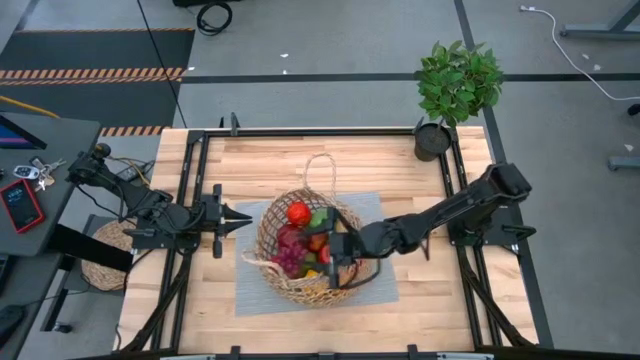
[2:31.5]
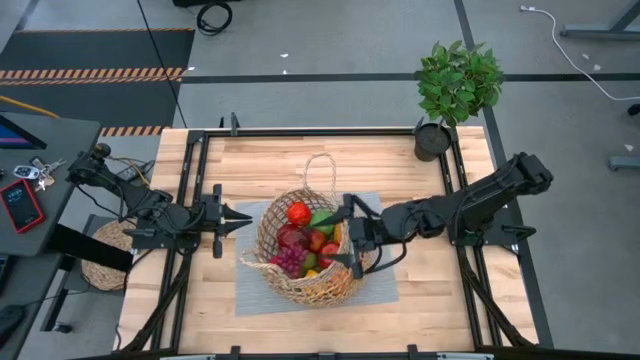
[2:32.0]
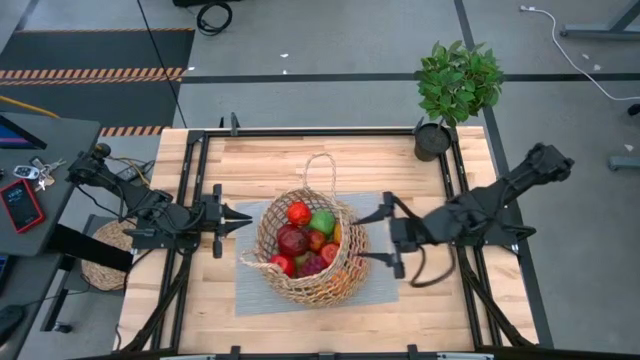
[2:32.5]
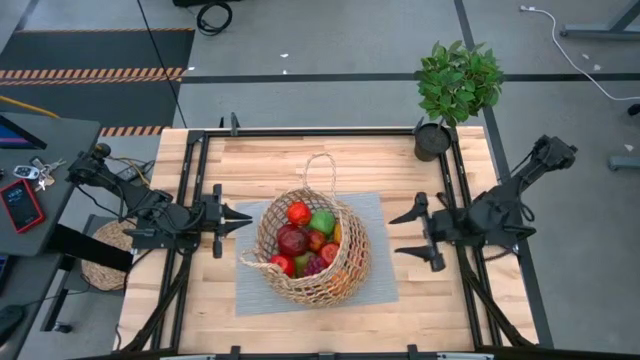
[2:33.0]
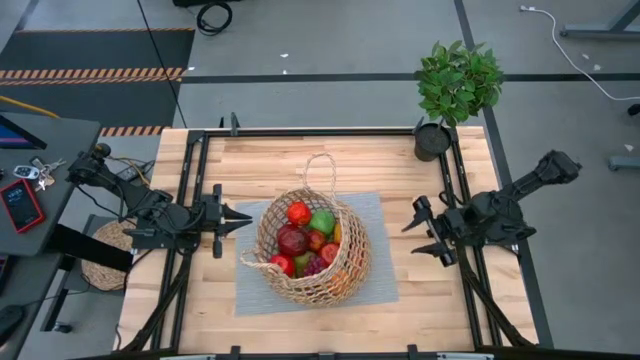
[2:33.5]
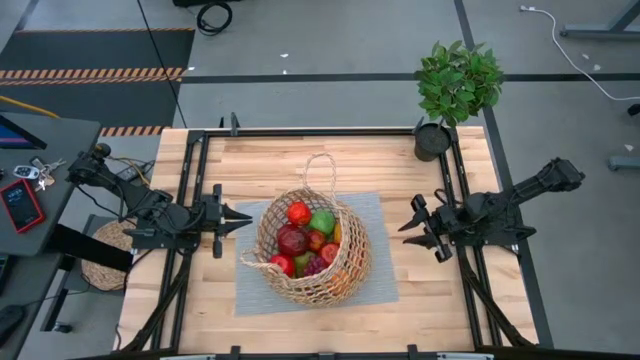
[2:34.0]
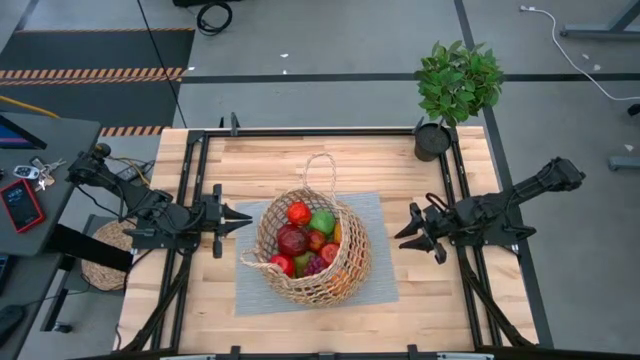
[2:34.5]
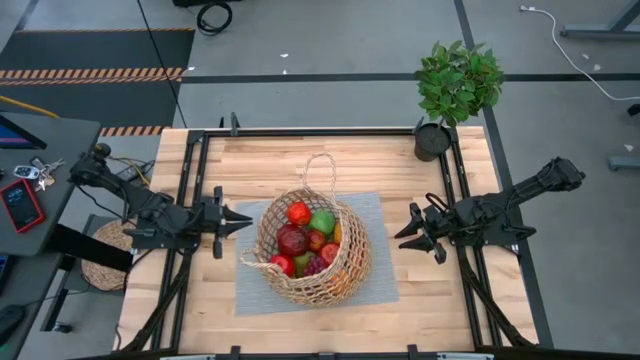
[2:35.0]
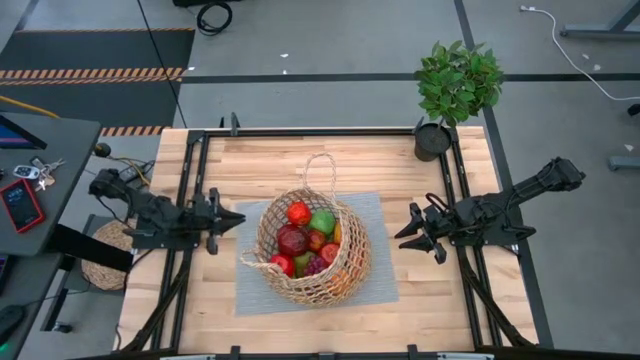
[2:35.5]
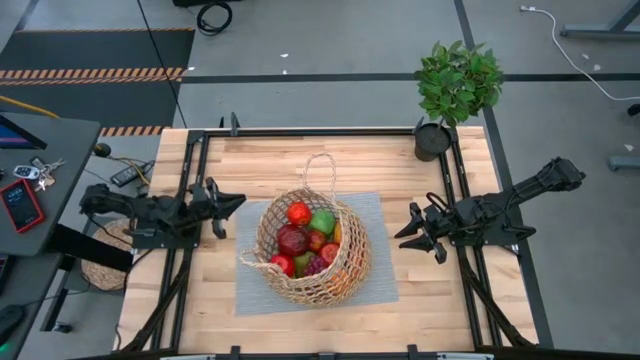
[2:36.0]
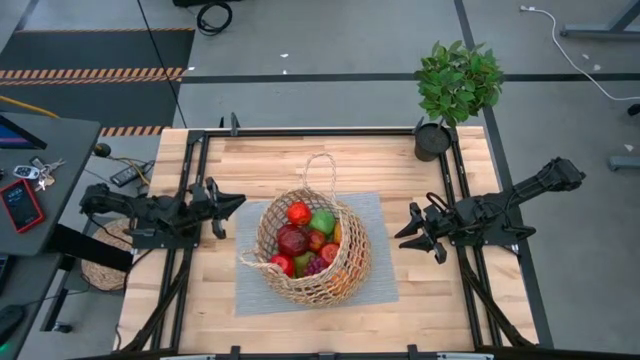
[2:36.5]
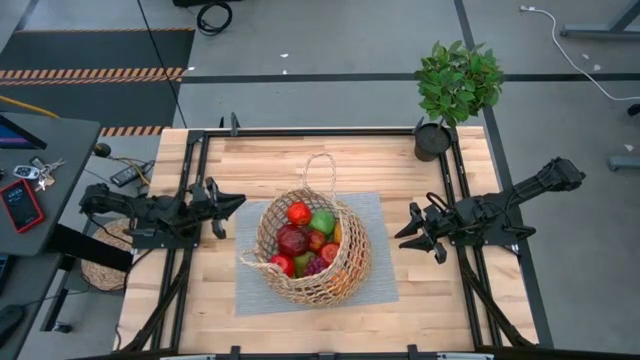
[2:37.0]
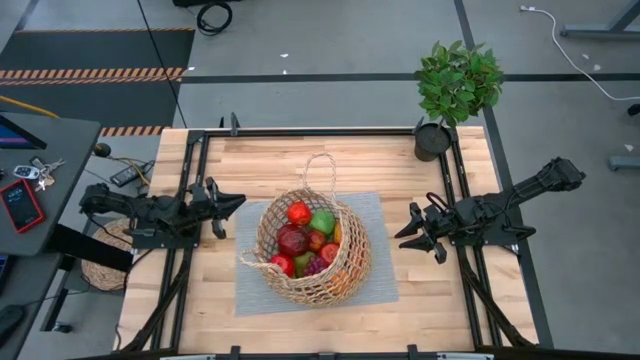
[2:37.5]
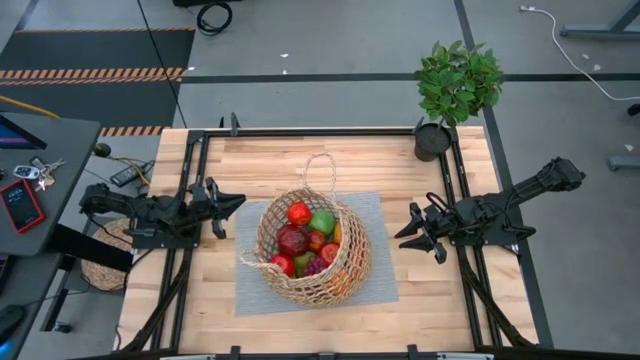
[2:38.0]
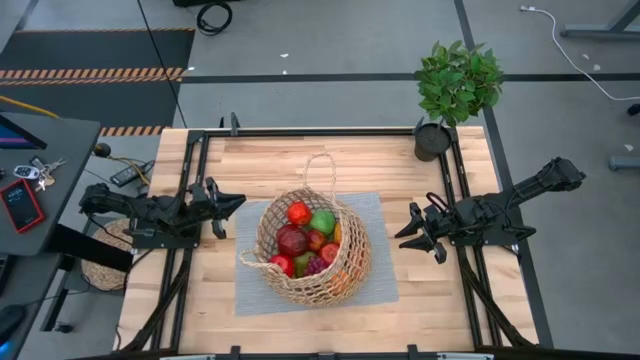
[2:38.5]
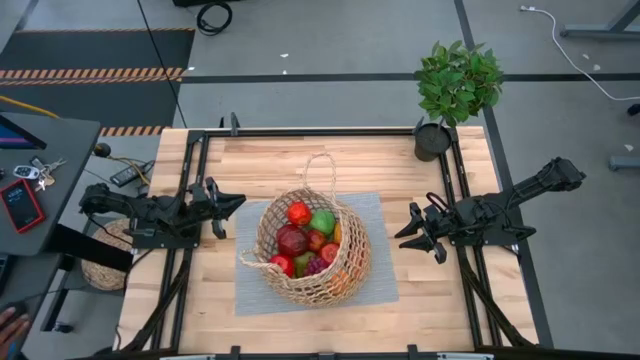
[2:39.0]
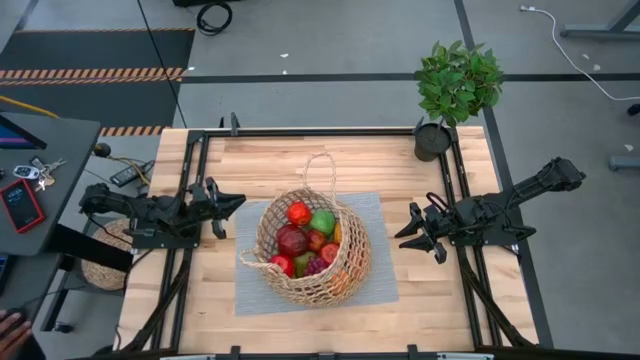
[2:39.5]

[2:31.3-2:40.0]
Task: Build produce basket
Return to home position

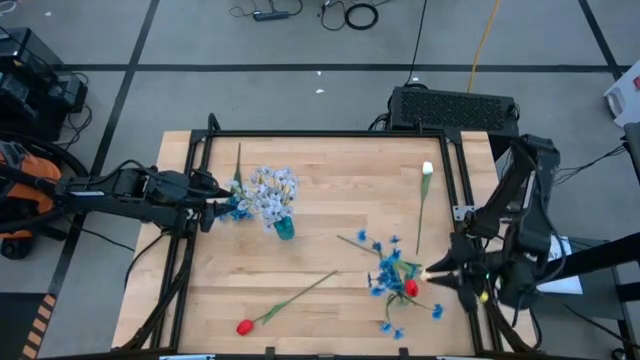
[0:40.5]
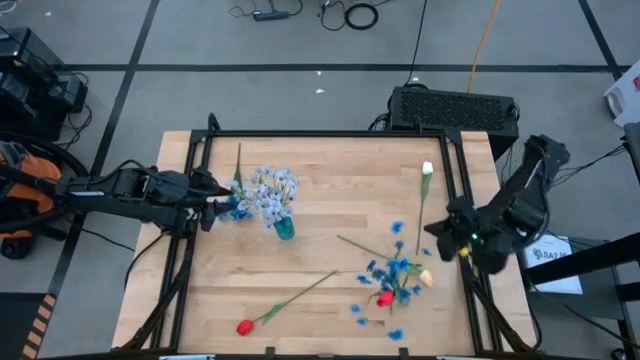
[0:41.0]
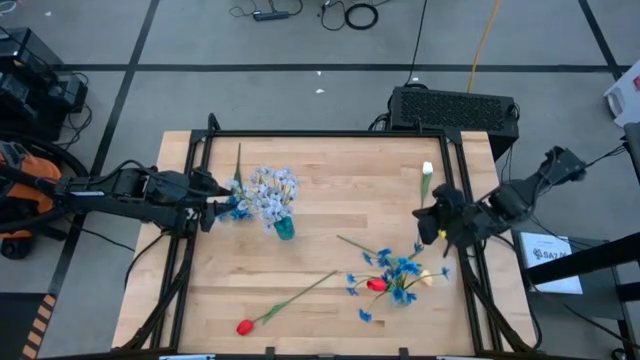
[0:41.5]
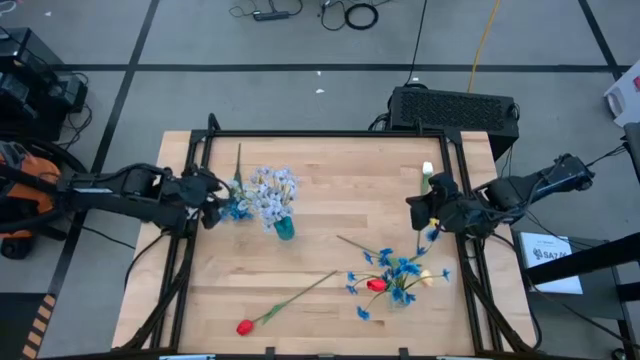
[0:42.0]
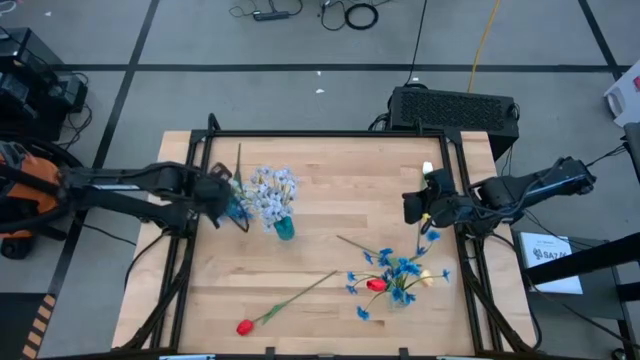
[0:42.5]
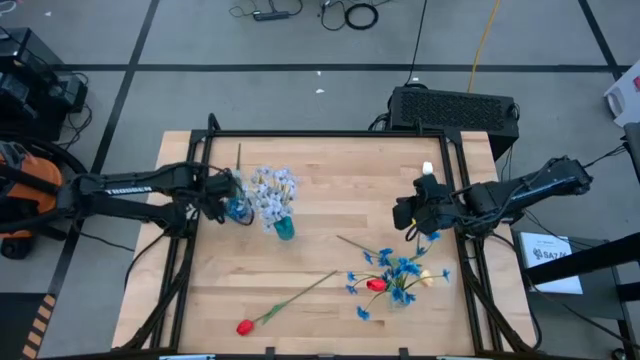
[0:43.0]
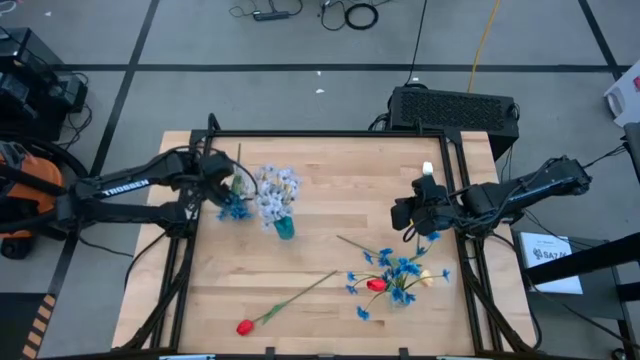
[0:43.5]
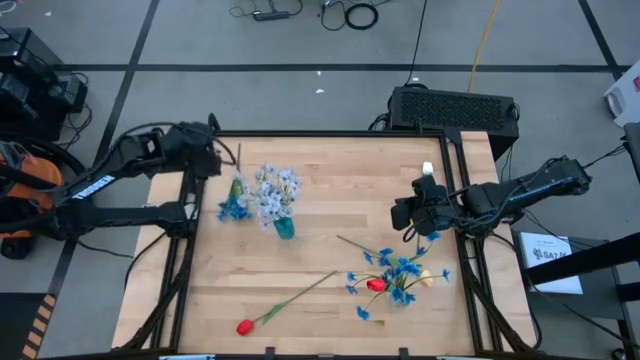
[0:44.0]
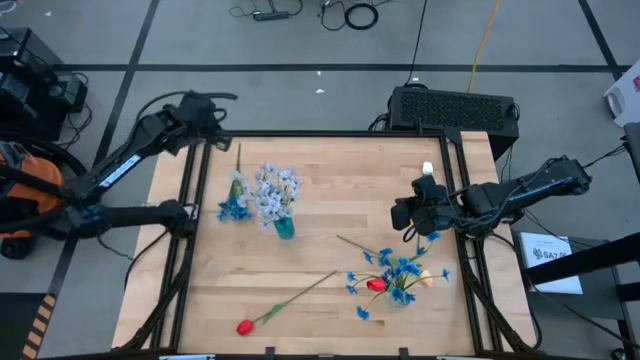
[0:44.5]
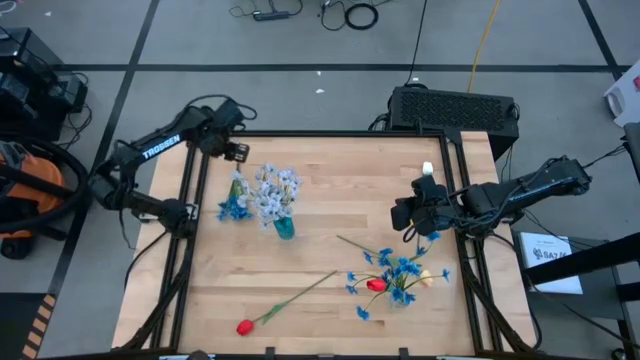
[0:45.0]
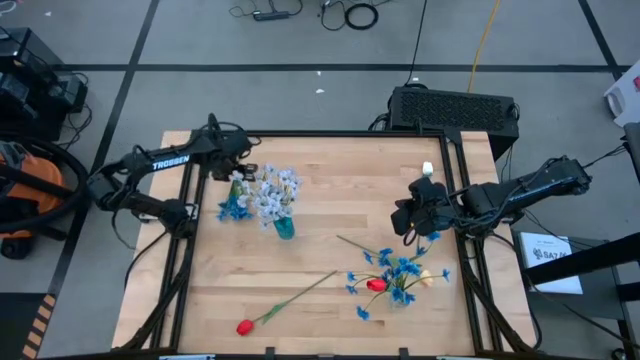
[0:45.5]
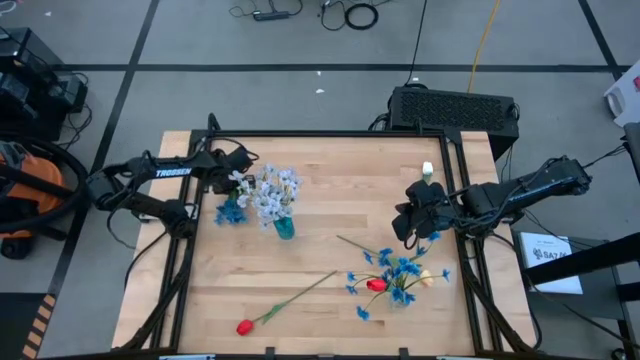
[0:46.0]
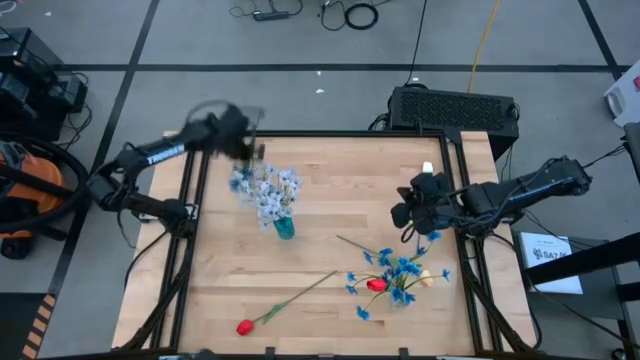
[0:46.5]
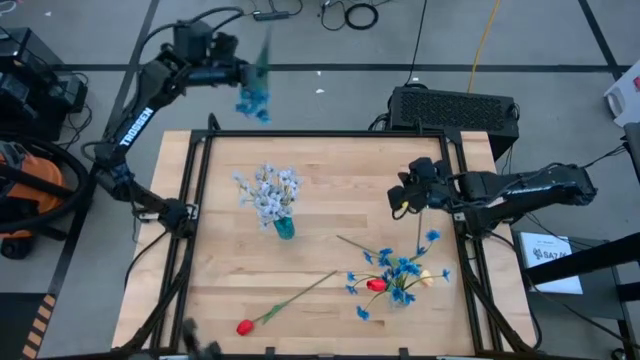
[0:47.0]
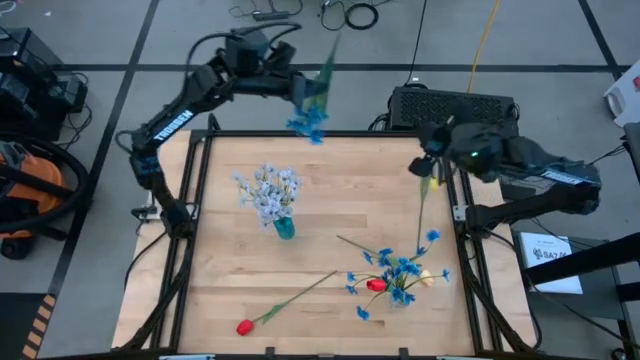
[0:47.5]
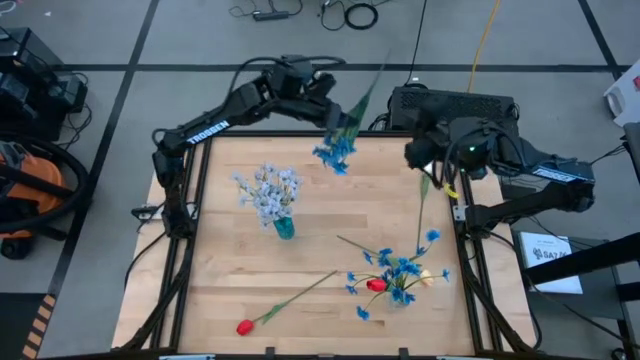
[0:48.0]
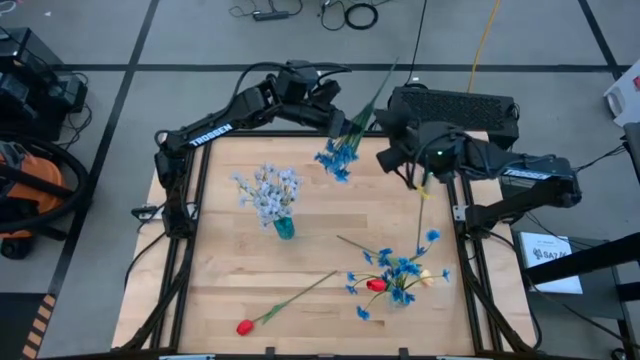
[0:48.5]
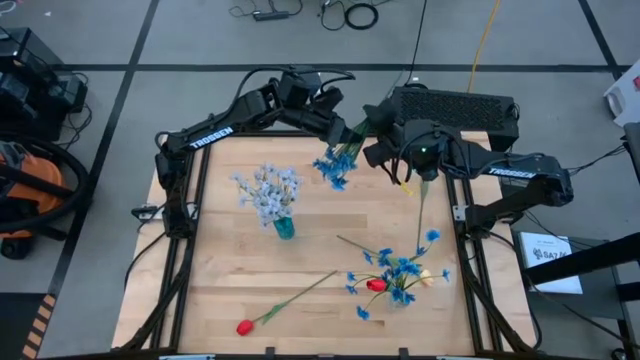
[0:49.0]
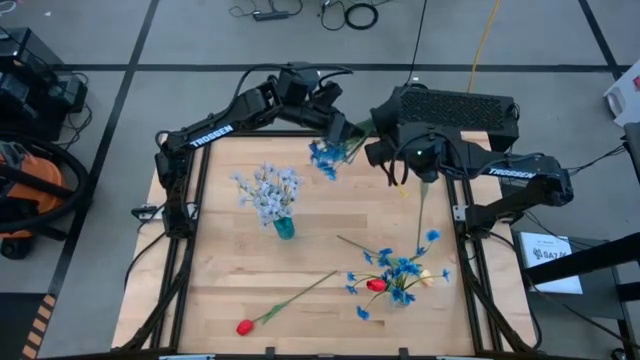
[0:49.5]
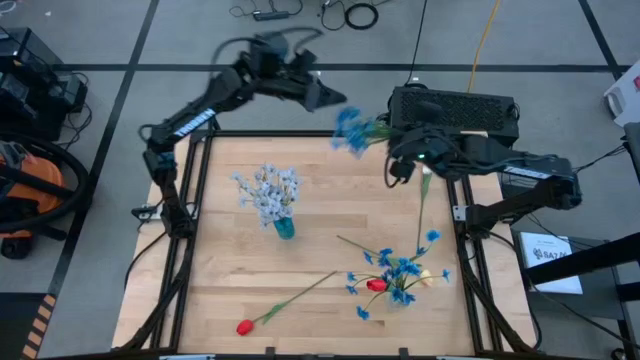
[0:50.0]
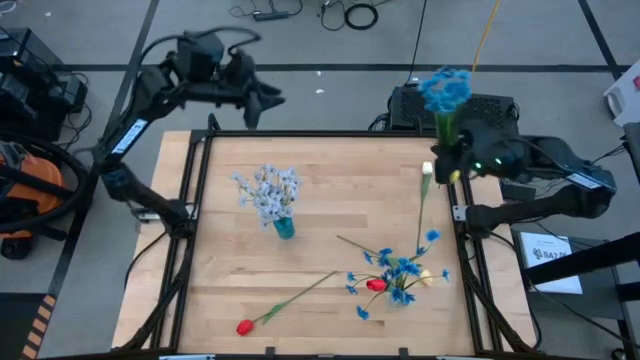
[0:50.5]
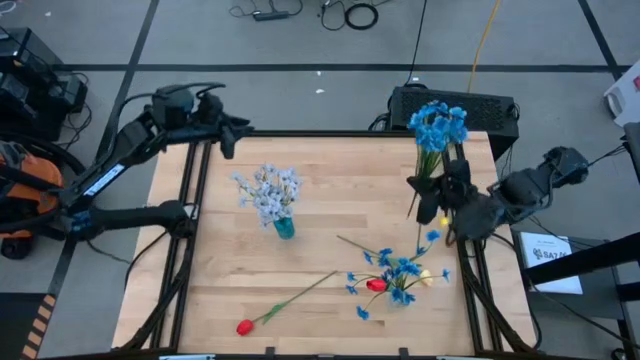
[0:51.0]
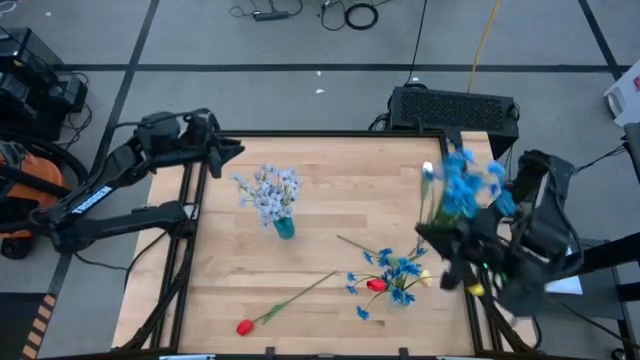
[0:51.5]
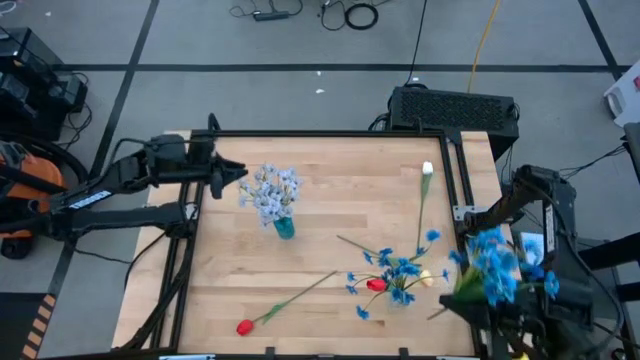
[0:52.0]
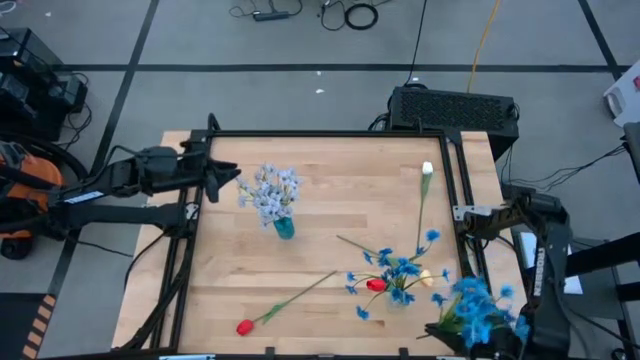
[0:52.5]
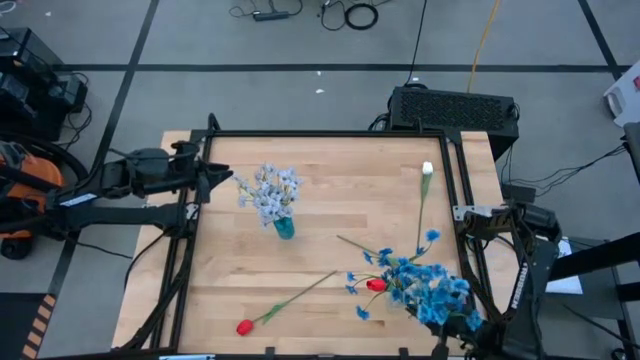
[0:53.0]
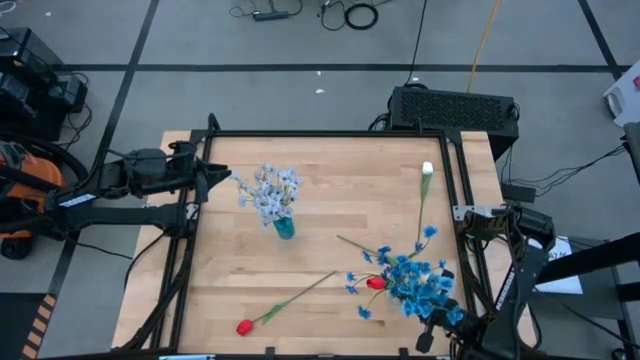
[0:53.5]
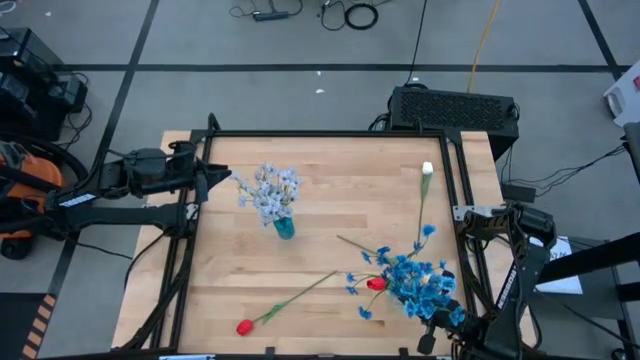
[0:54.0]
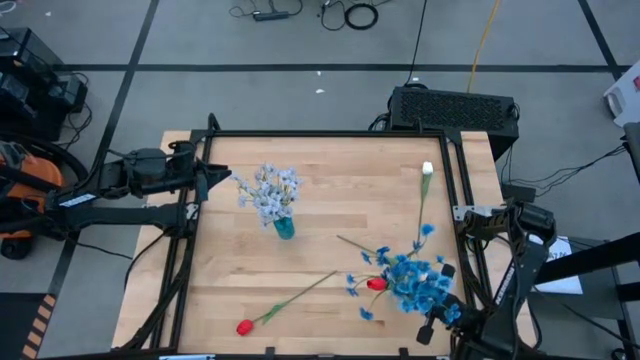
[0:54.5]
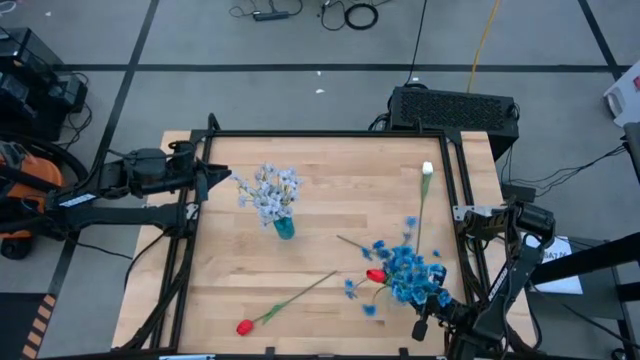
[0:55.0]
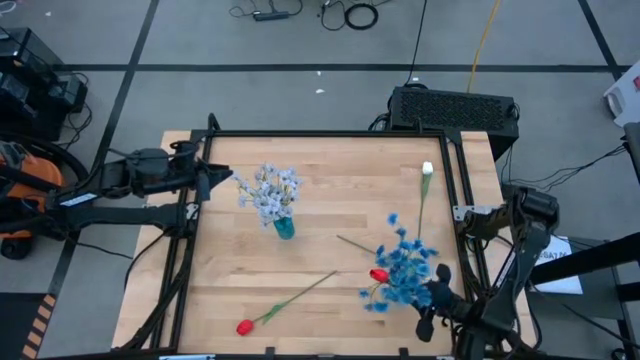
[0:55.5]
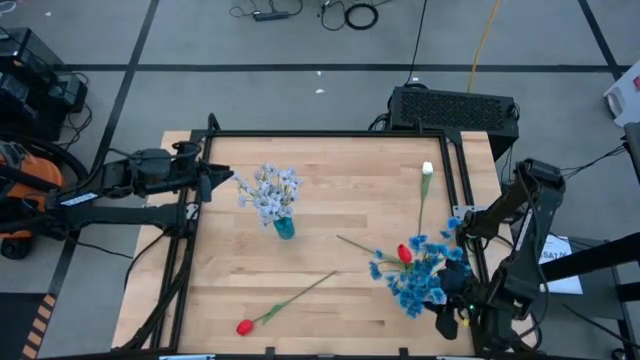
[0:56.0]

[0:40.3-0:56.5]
Task: Sort flowers into vase by color
Put the blue flower into the transparent vase
